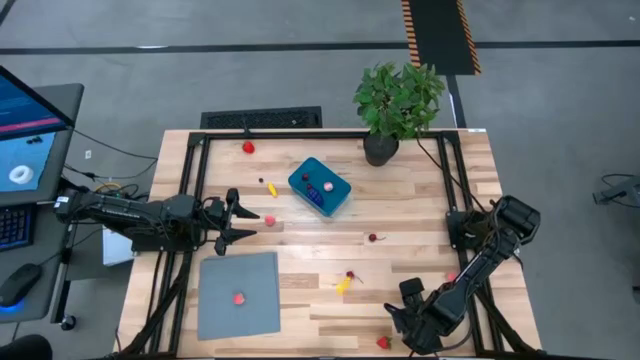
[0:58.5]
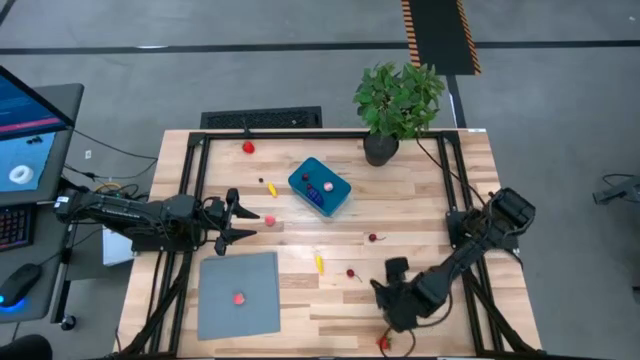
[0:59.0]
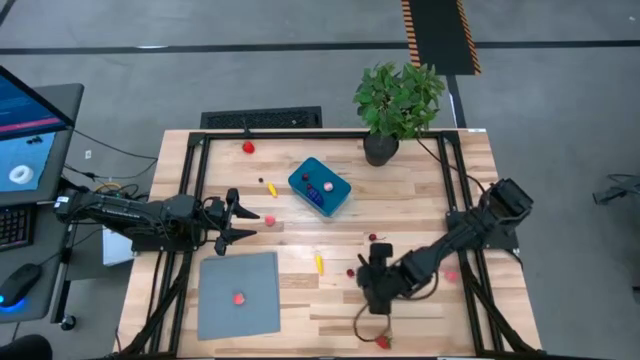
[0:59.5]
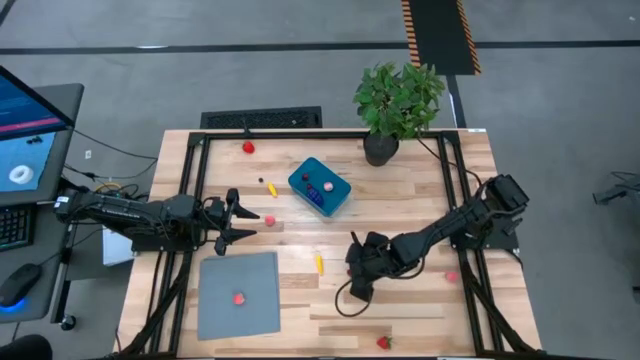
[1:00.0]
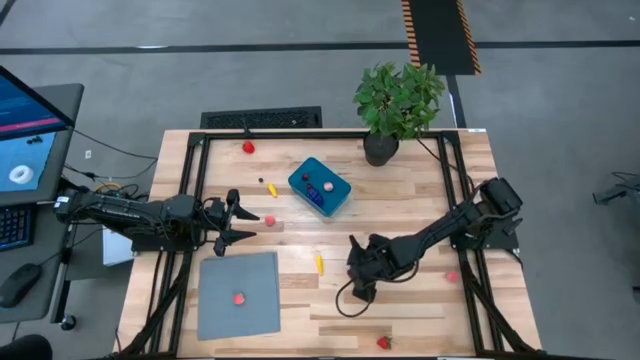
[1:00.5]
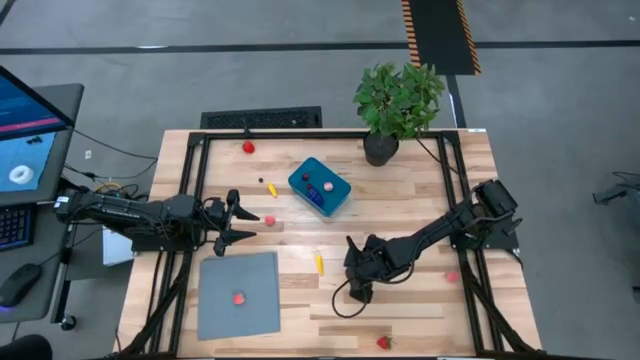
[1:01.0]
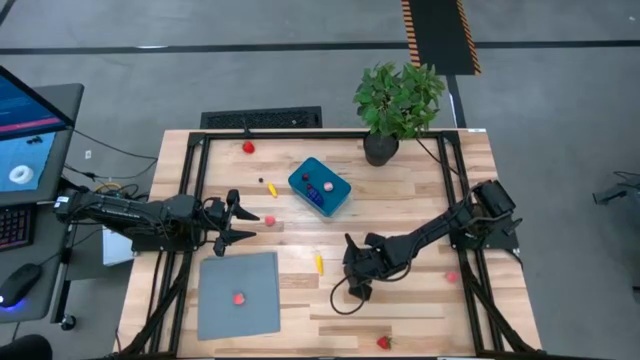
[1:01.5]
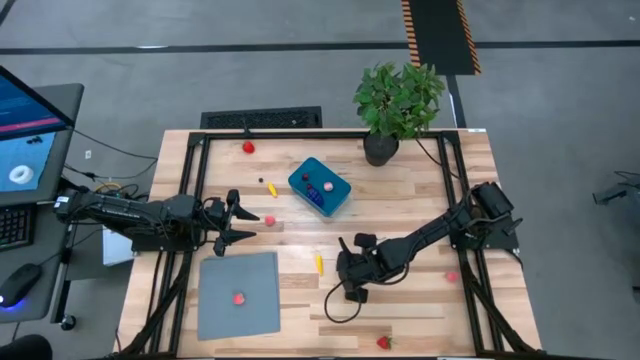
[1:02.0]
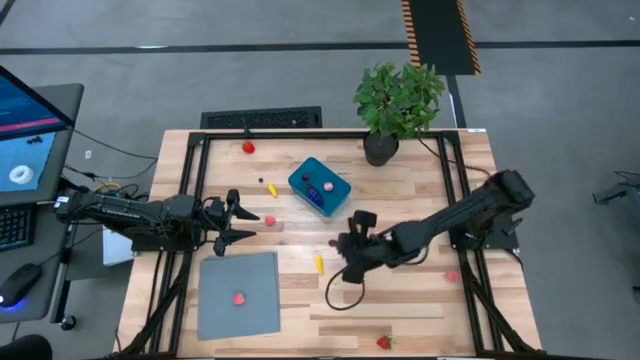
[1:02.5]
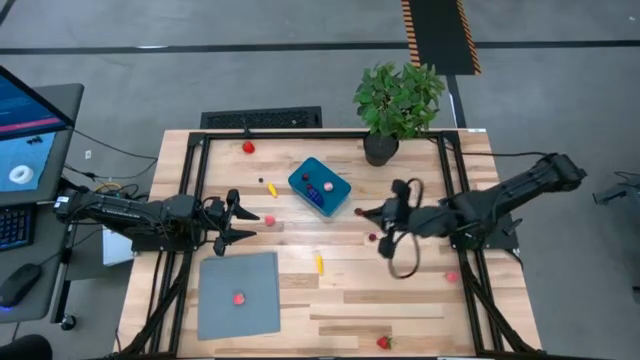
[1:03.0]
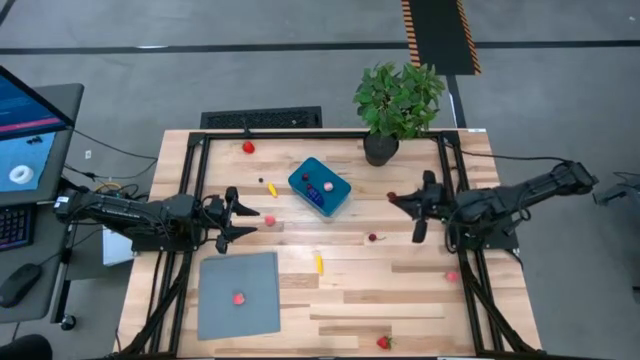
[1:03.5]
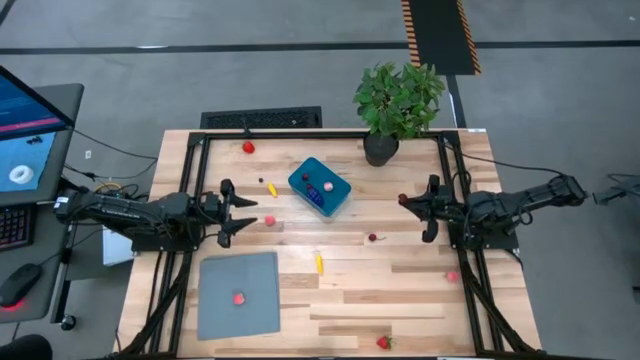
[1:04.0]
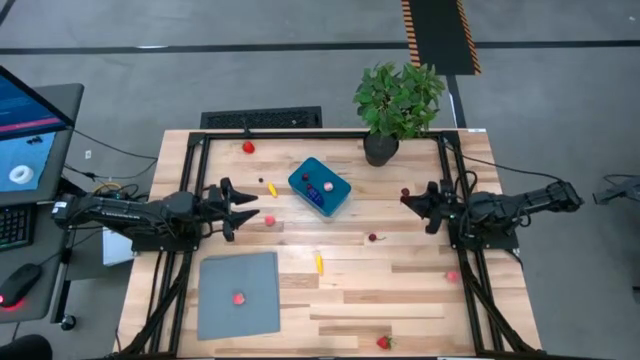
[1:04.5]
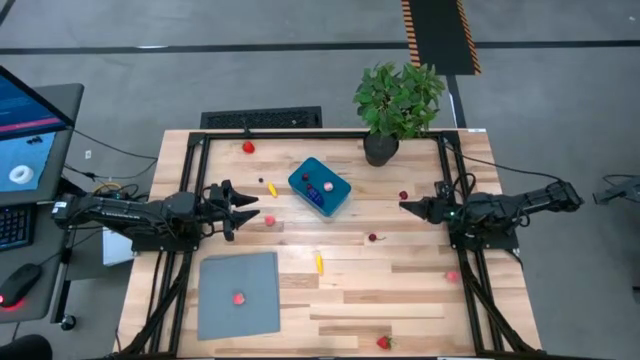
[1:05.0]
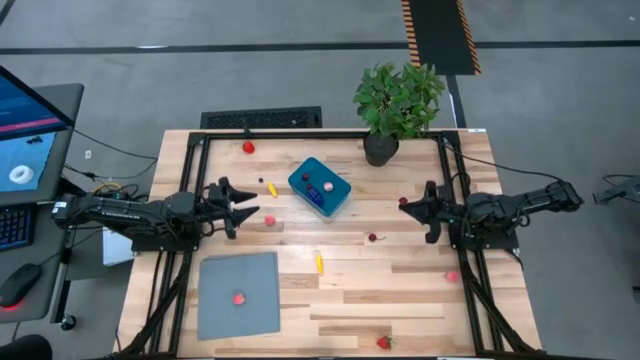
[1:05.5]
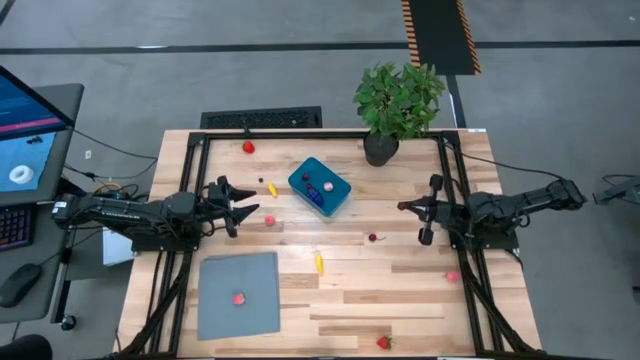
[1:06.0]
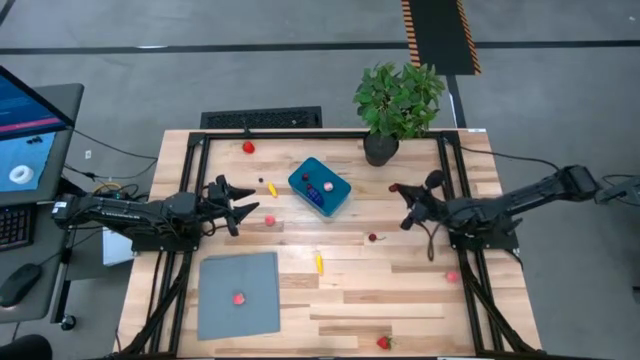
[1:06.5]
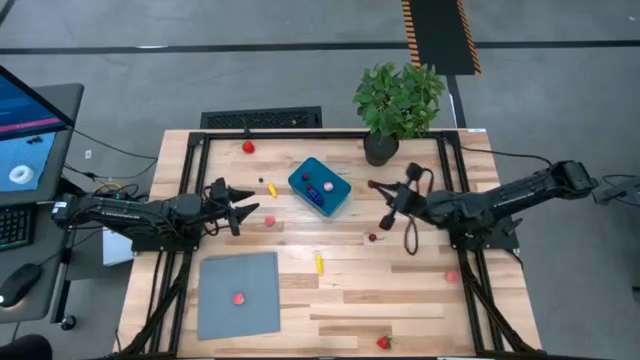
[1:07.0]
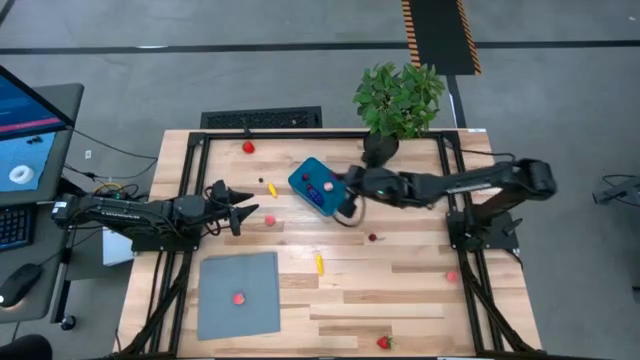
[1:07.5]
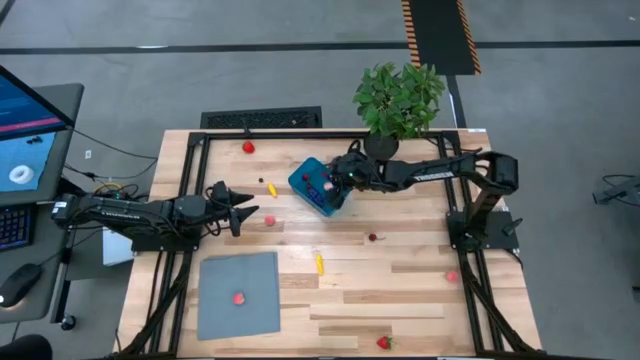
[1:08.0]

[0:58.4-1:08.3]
Task: Pick and placing Produce into tupperware
Put the bottom cherry into the container

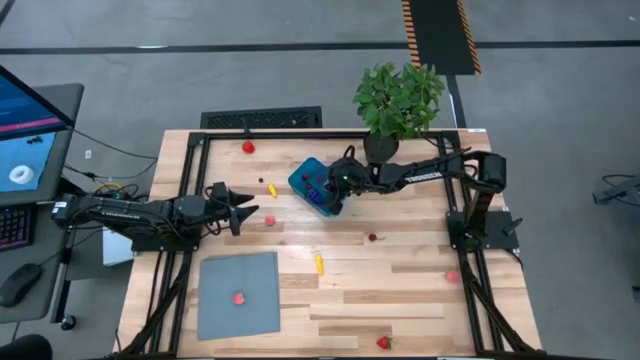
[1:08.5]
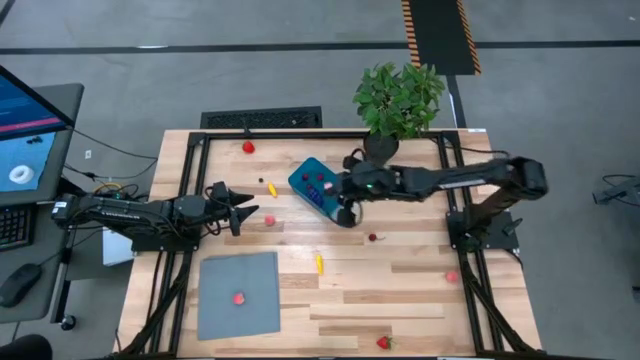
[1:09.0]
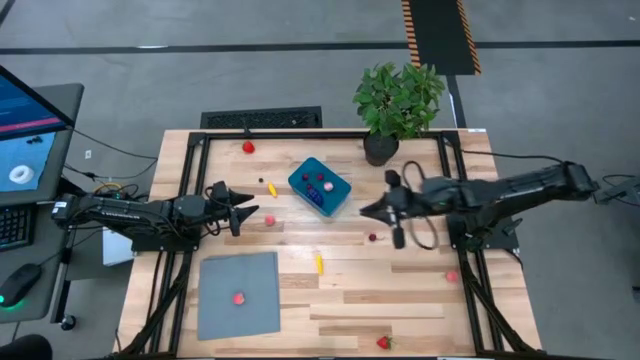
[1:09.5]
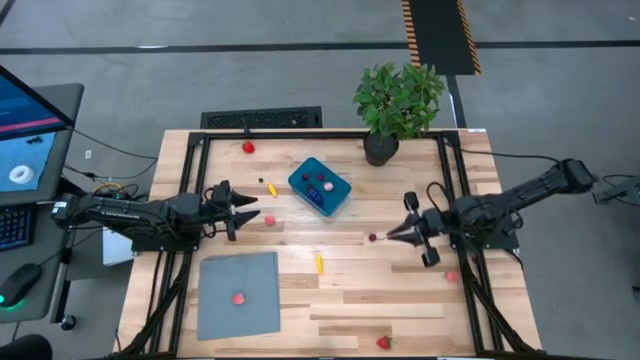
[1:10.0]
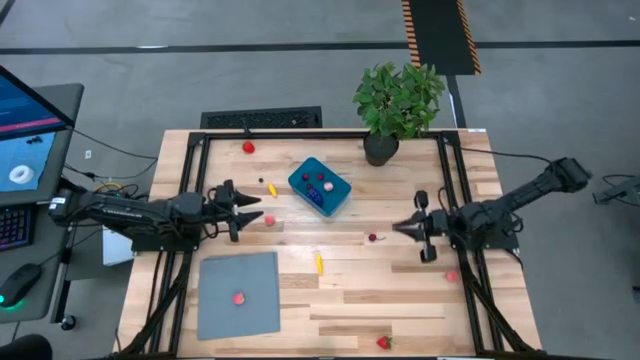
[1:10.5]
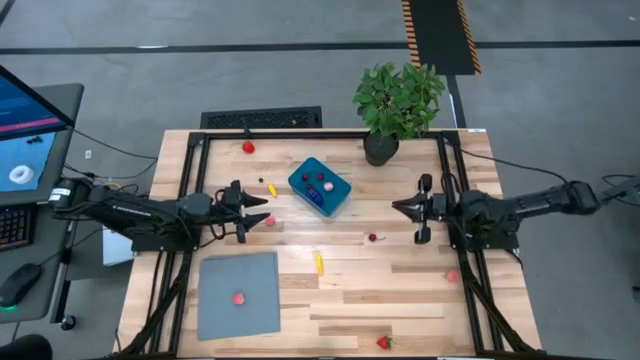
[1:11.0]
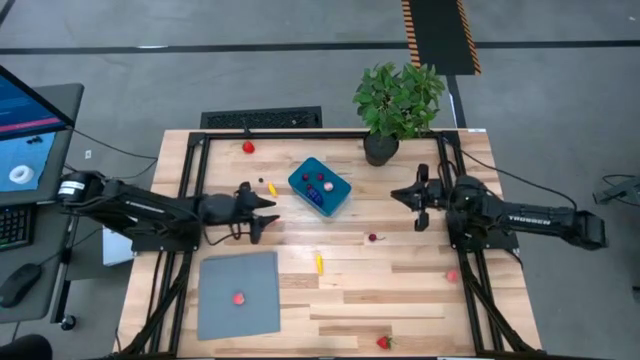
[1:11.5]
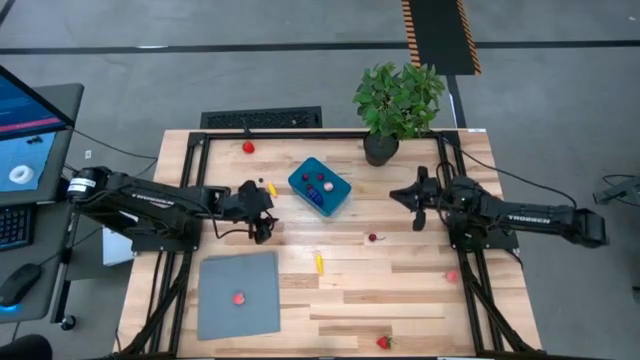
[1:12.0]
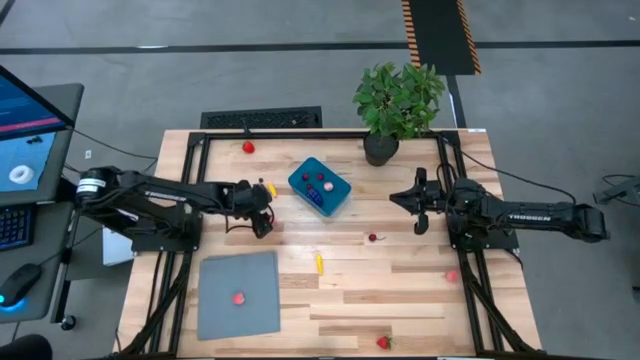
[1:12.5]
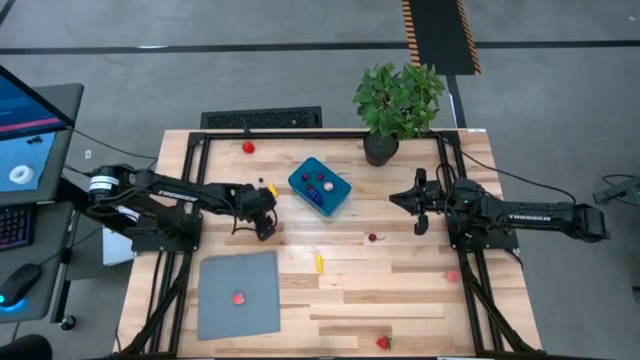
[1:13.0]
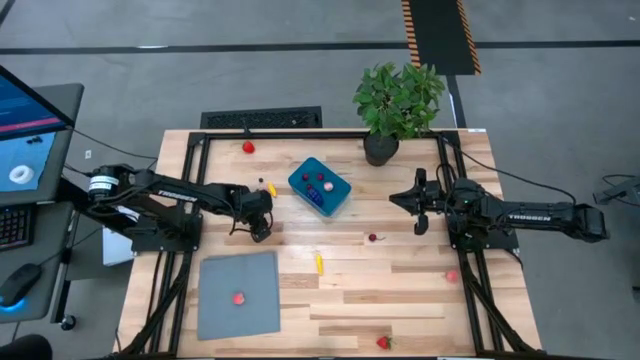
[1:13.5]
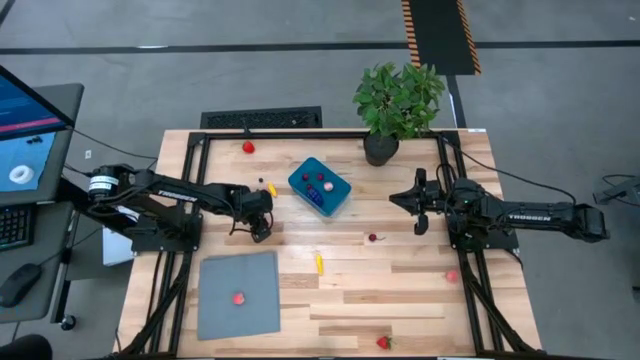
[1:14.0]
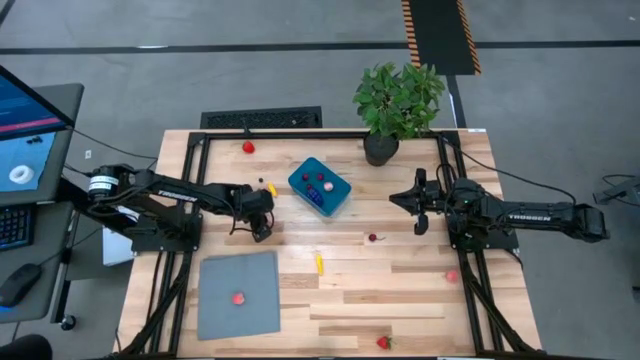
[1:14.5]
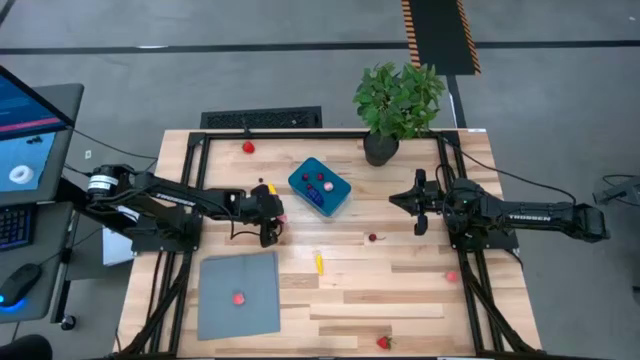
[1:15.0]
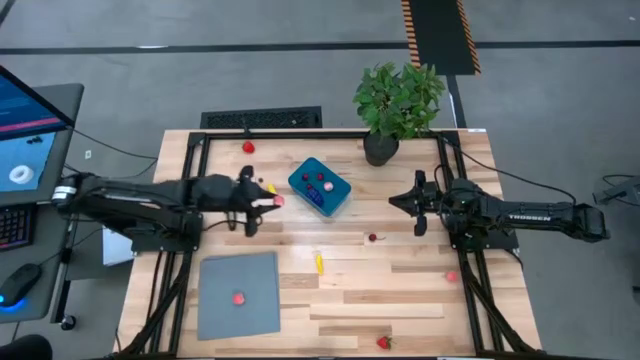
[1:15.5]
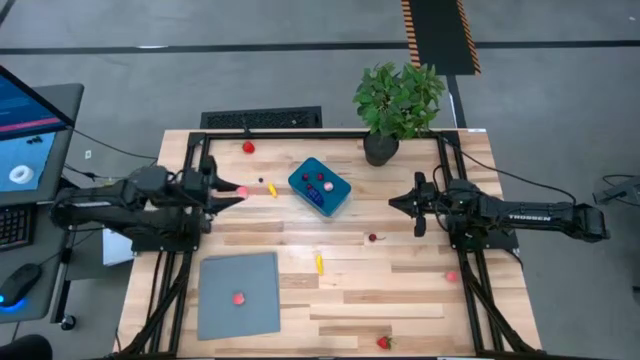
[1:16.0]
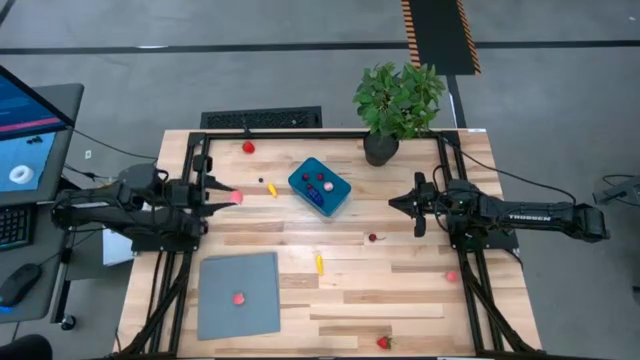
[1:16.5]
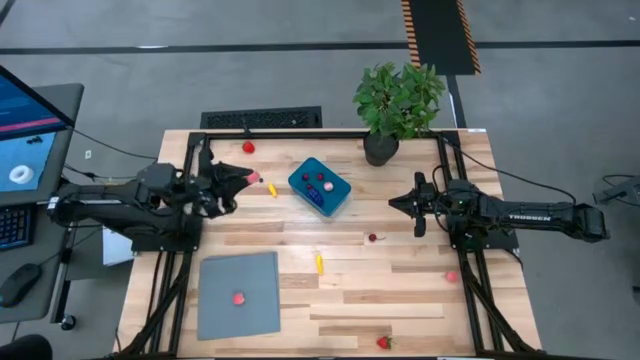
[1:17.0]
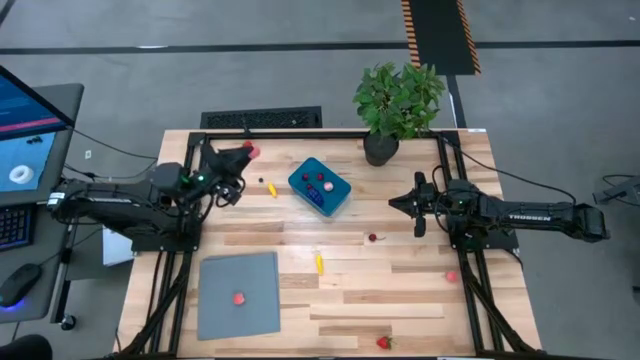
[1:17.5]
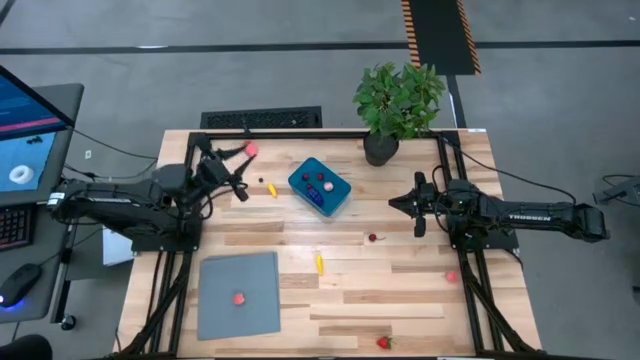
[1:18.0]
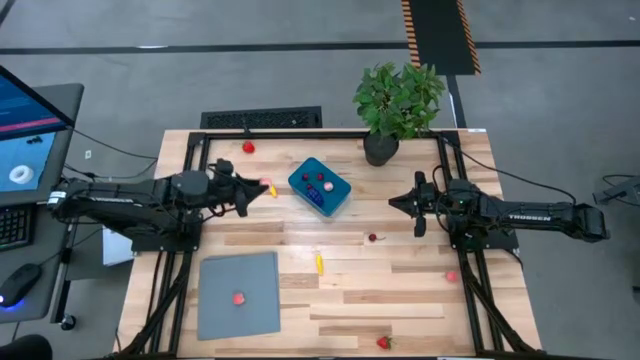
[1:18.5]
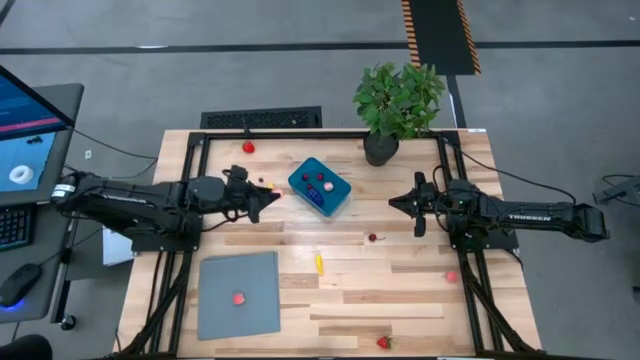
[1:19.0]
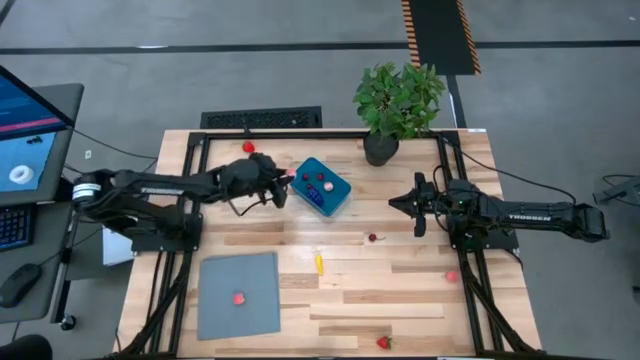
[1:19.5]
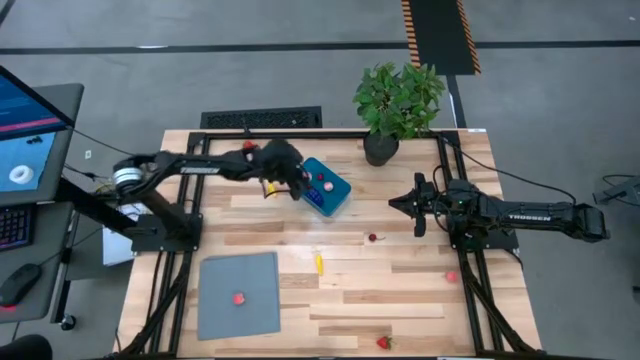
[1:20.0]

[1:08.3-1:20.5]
Put the top apricot into the container
